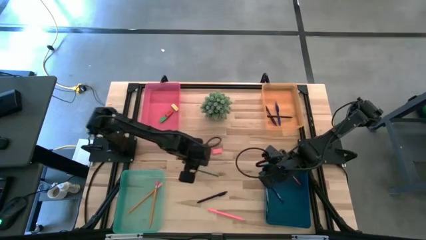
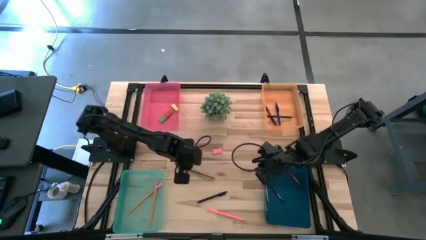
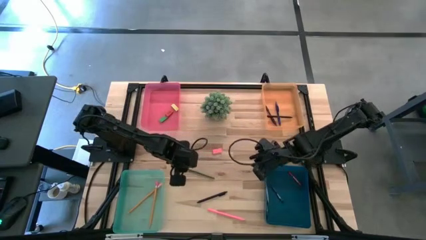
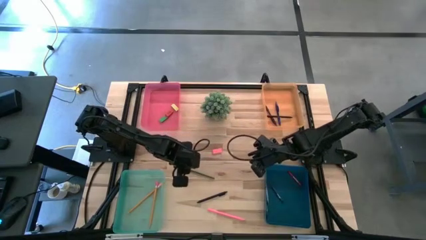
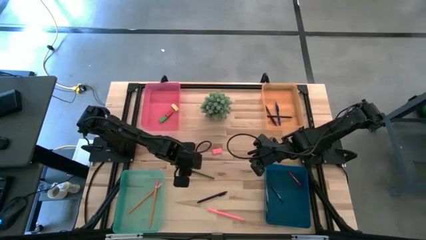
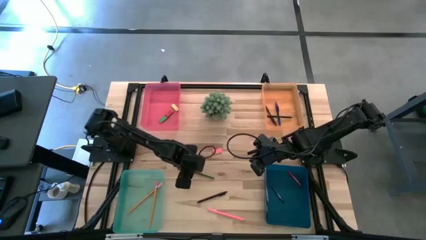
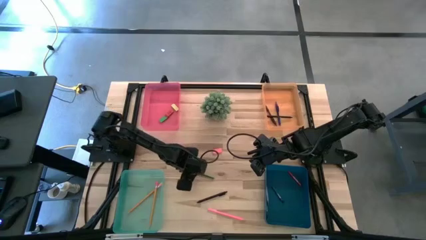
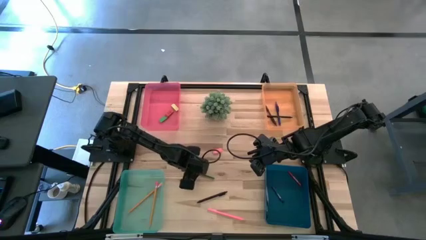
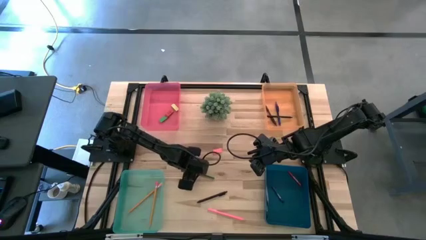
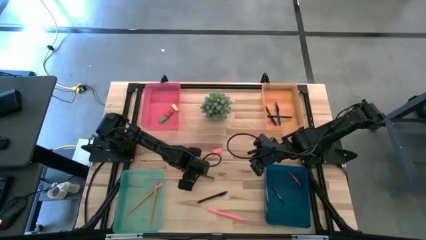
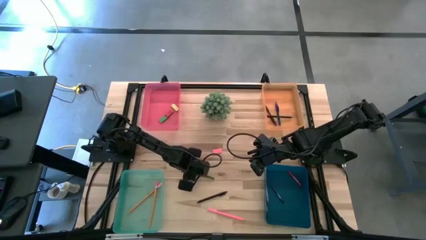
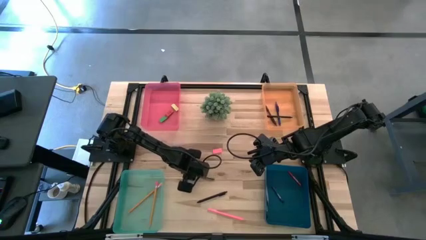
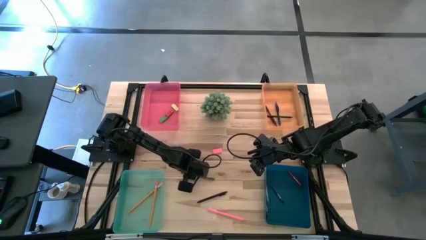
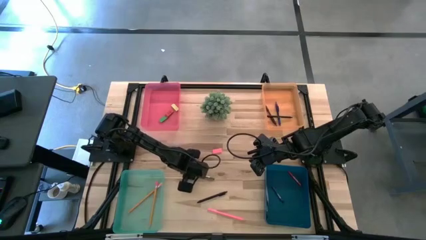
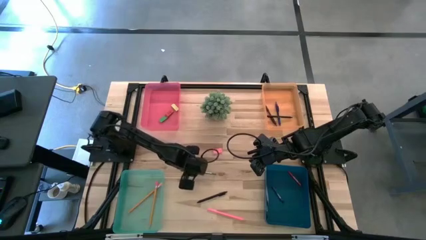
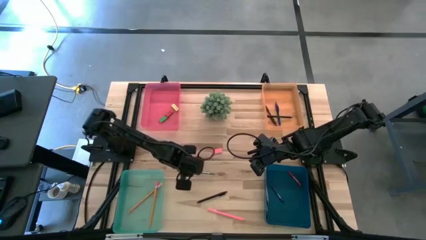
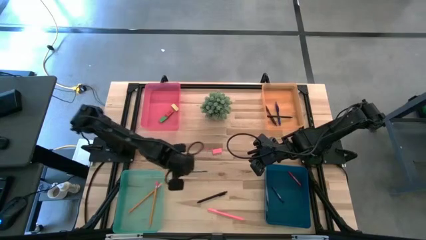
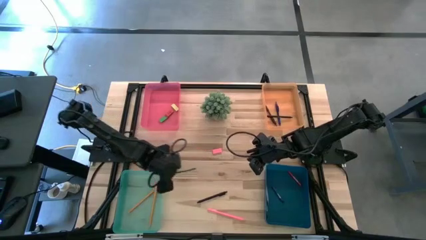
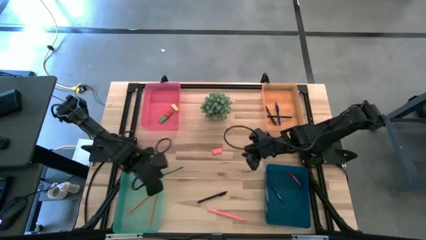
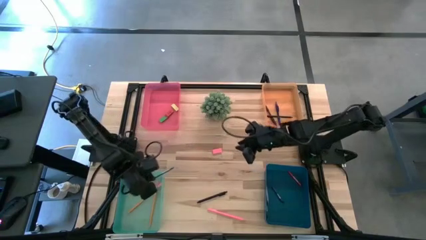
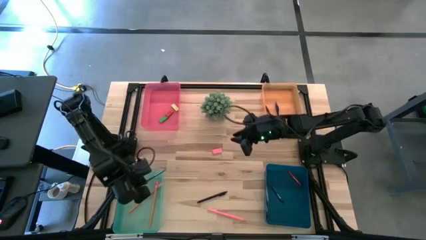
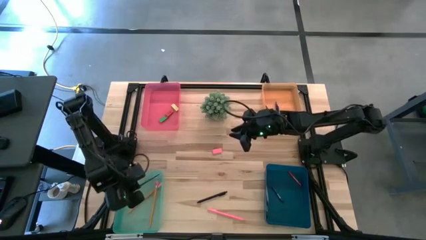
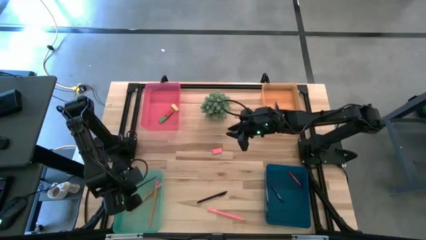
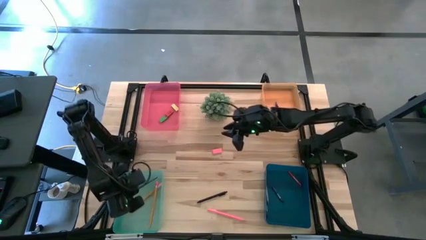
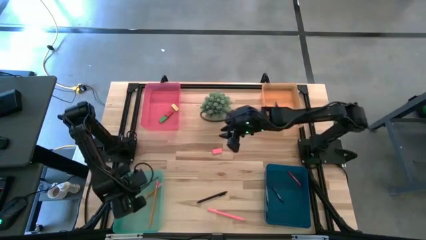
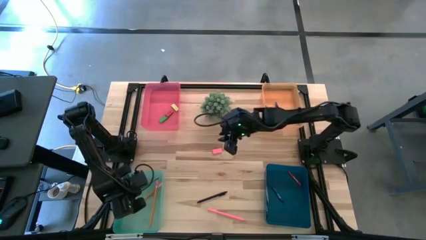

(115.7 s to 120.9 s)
Task: Sort crayons/erasers/pens/pencils in bins
Put the green pencil into the green bin

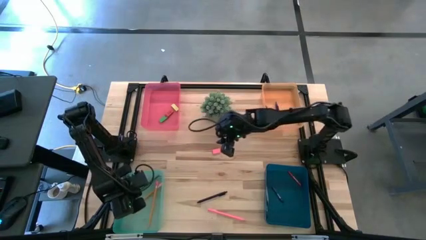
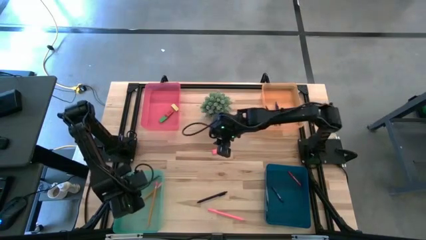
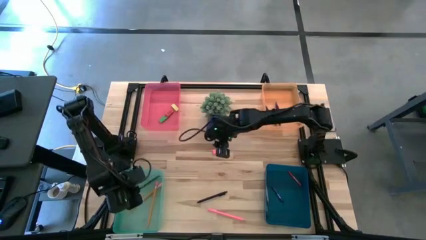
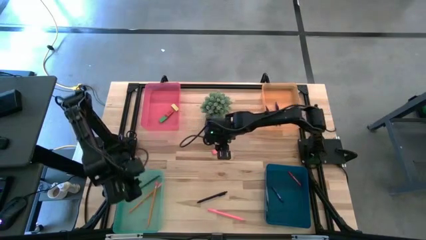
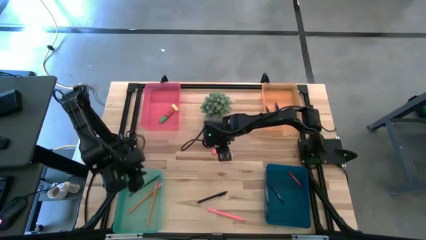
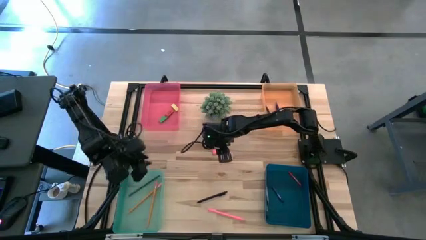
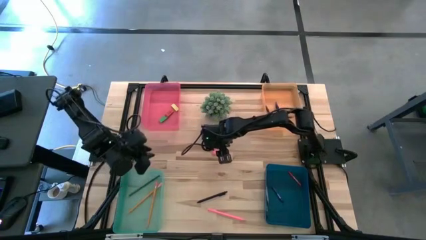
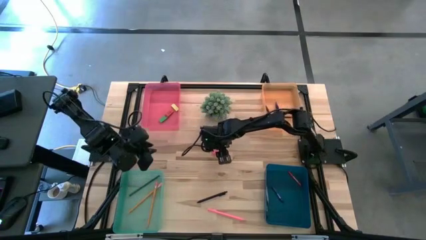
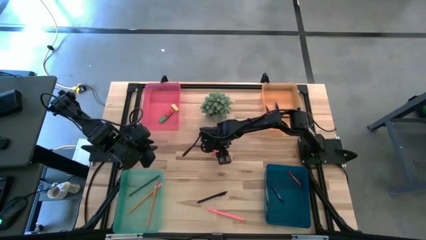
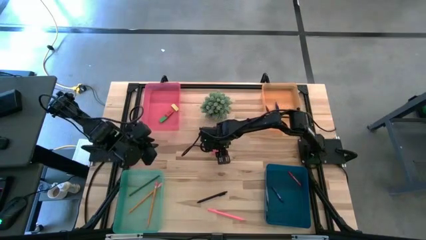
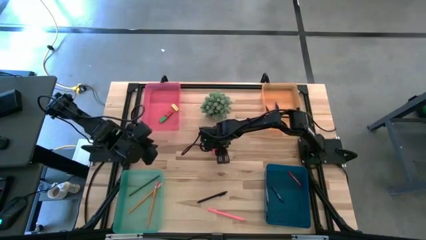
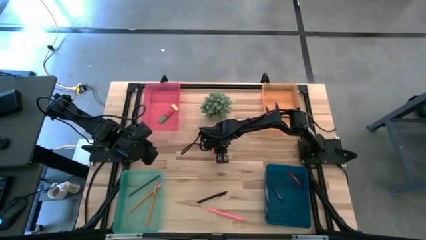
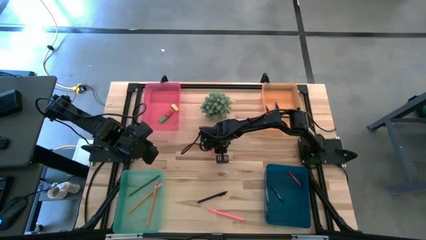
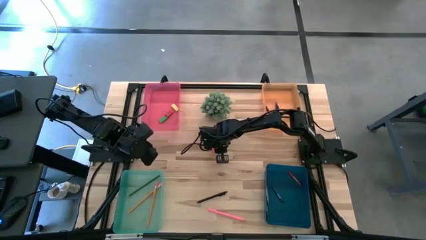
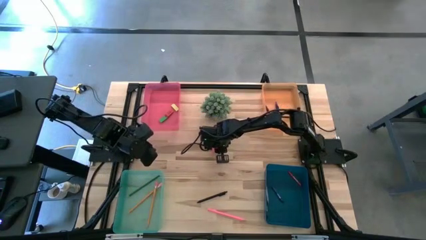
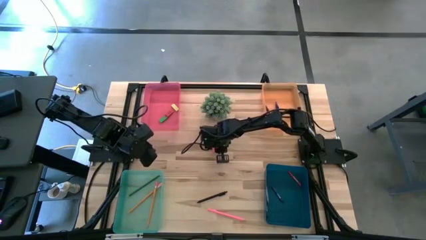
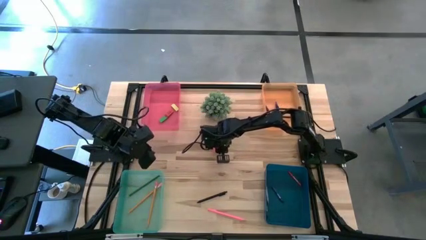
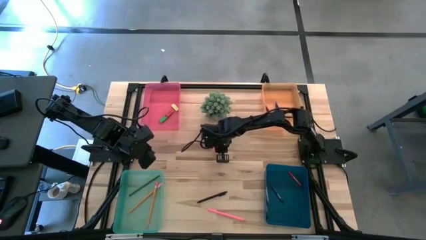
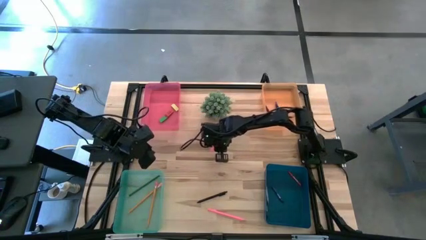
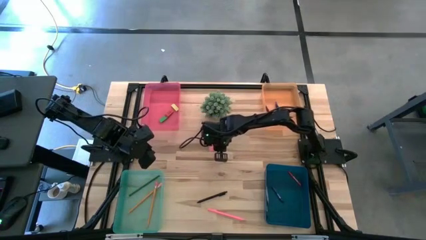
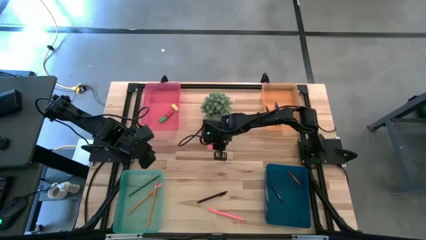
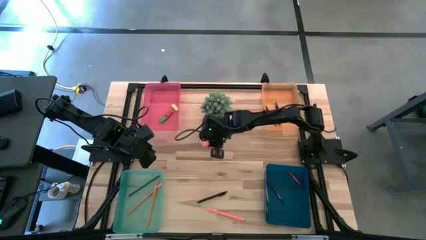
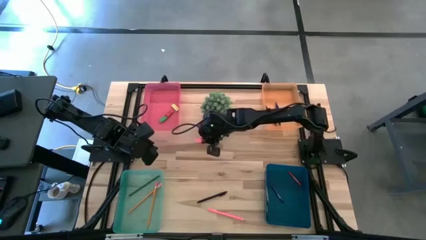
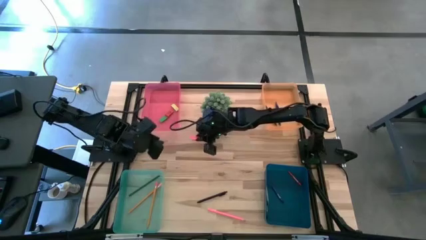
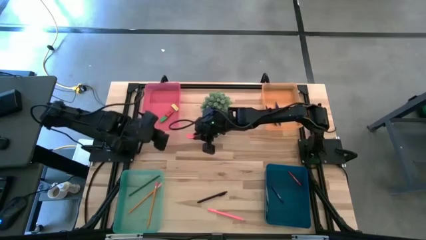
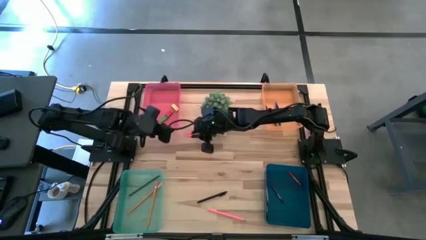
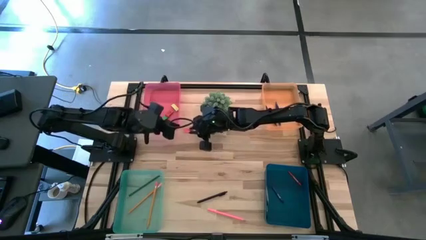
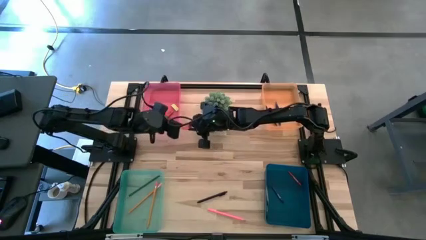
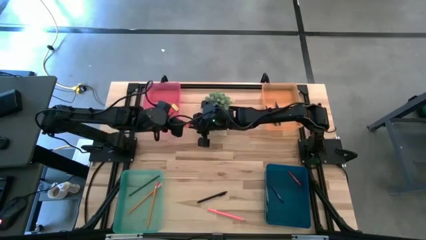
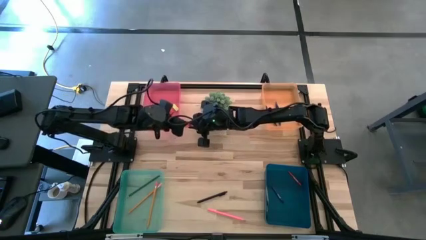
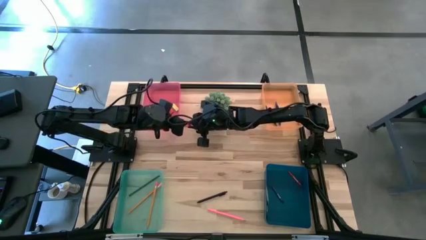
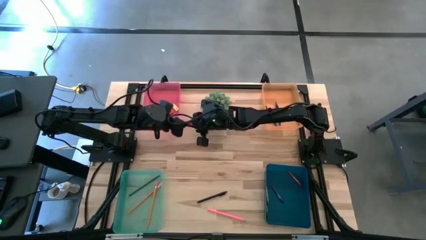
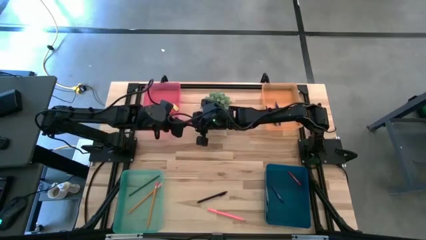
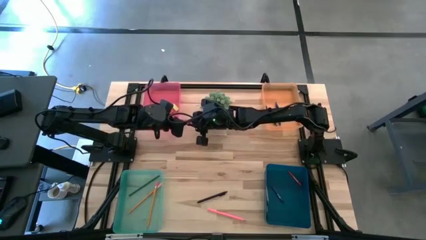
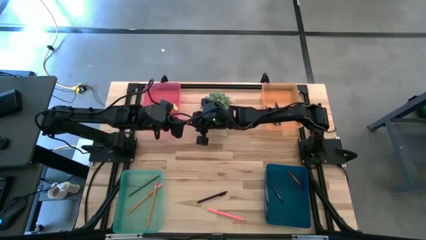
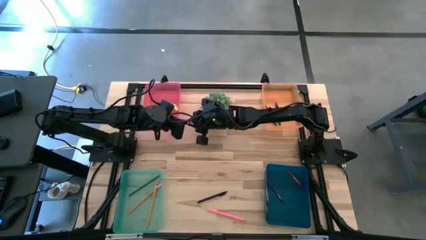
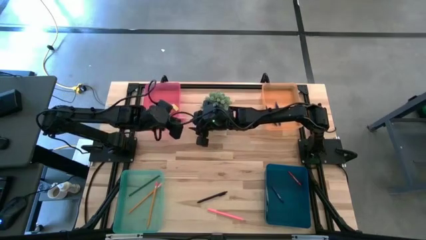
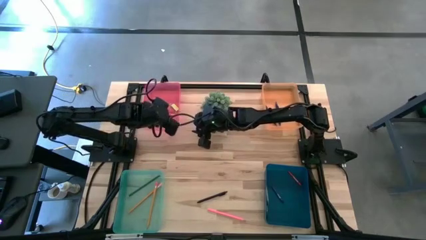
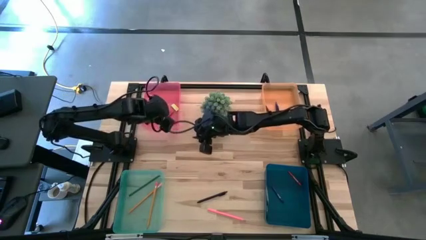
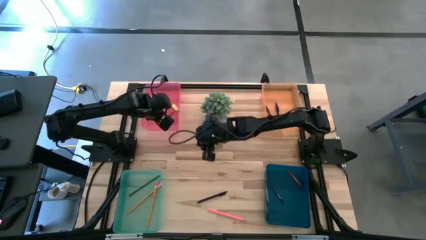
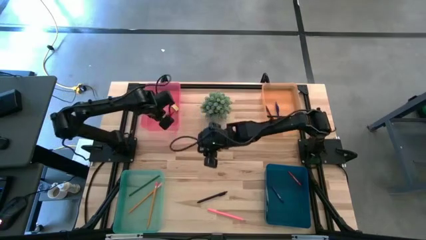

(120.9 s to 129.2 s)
Put the pink eraser into the red bin
